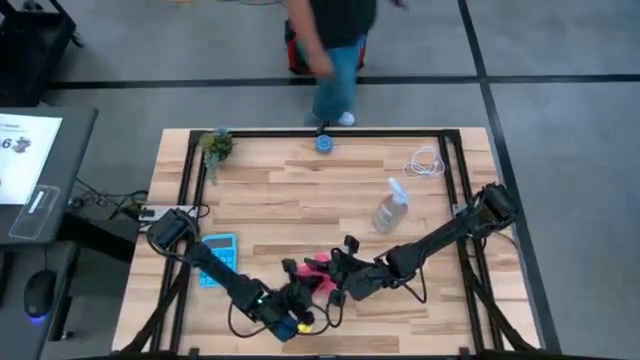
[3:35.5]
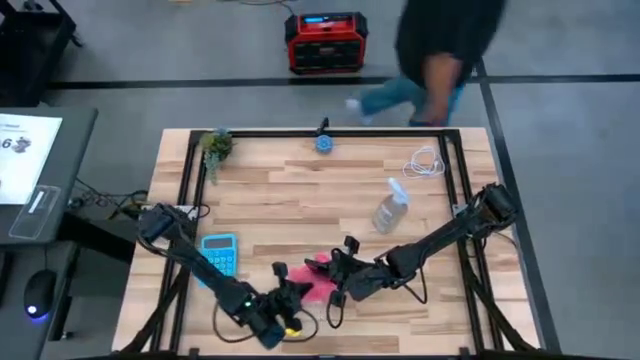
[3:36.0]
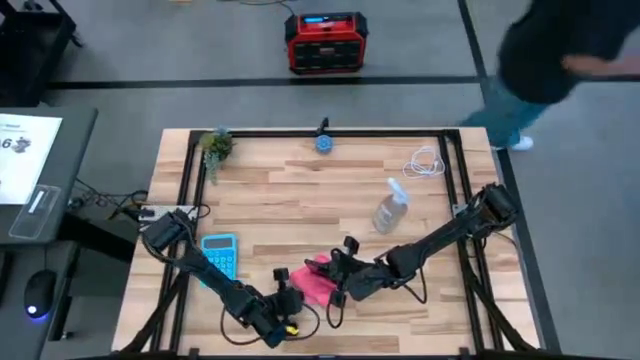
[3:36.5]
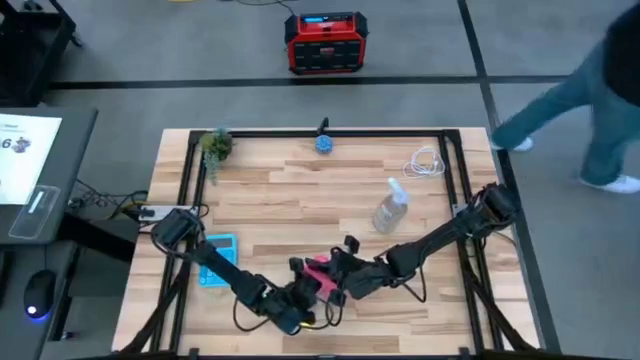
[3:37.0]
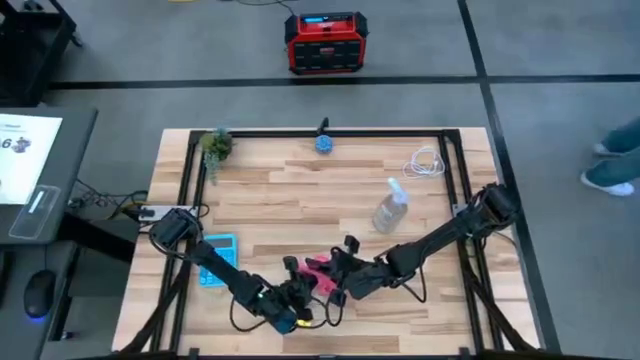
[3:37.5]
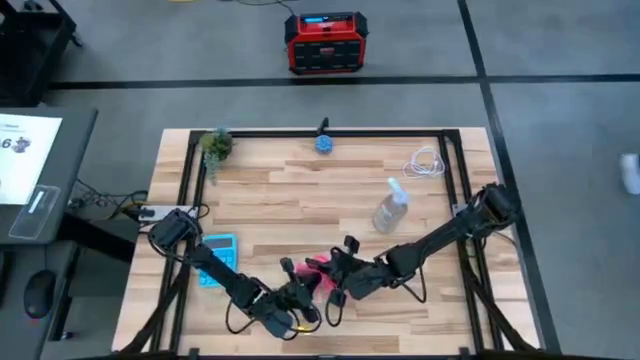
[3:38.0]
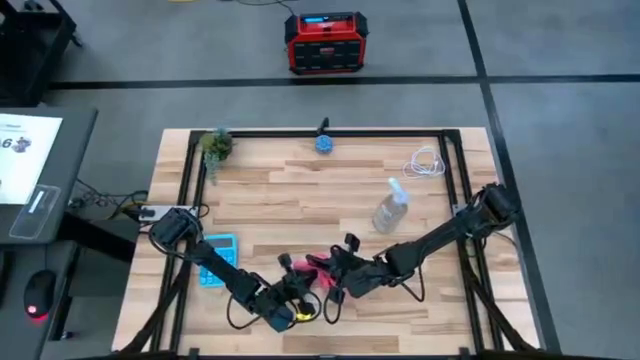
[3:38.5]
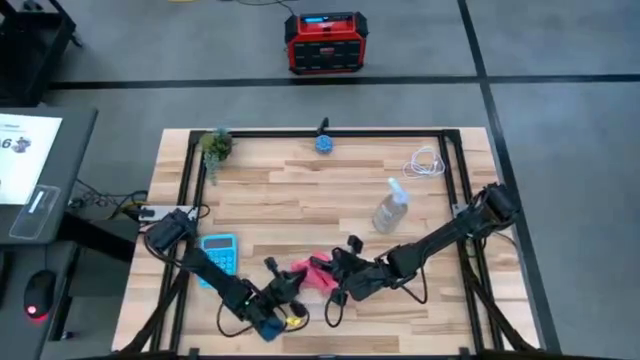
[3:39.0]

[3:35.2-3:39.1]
Task: Apply microfiber cloth
Wipe the front of the black cellphone using pink microfiber cloth

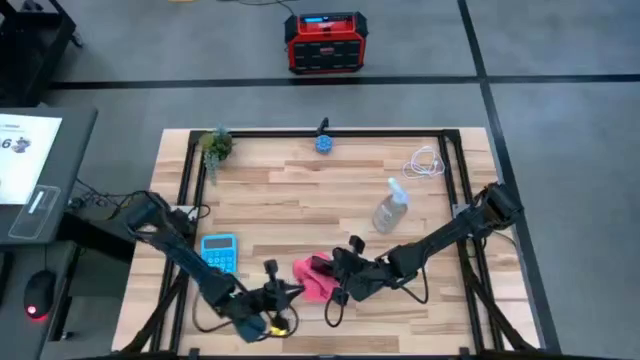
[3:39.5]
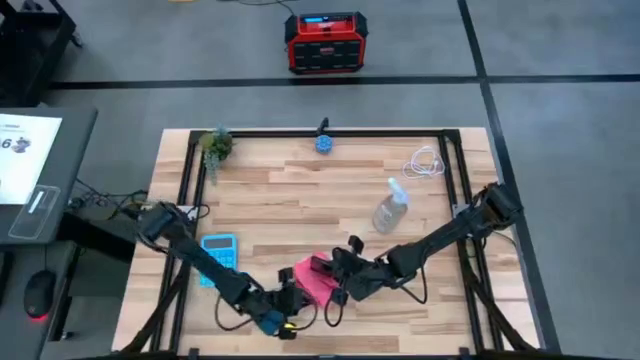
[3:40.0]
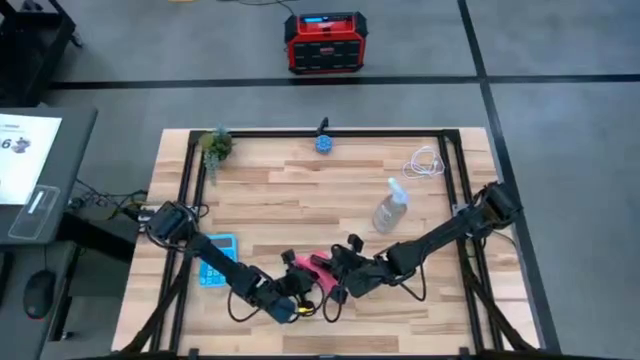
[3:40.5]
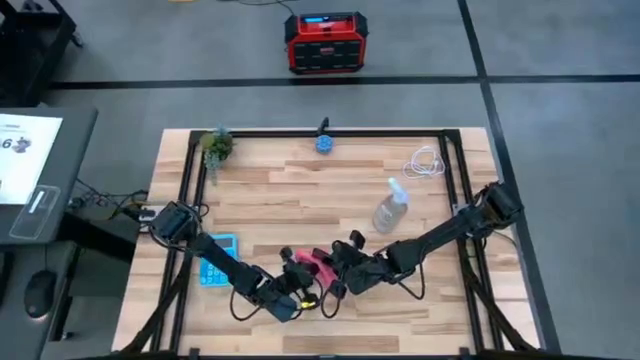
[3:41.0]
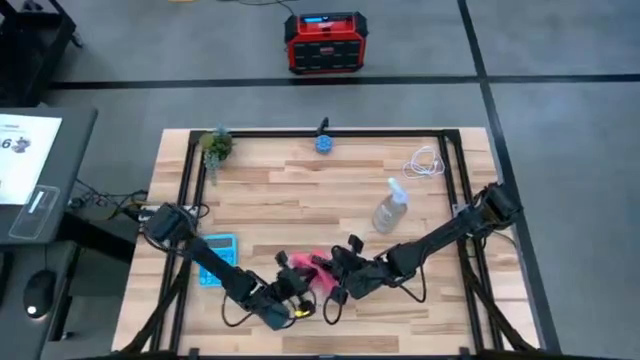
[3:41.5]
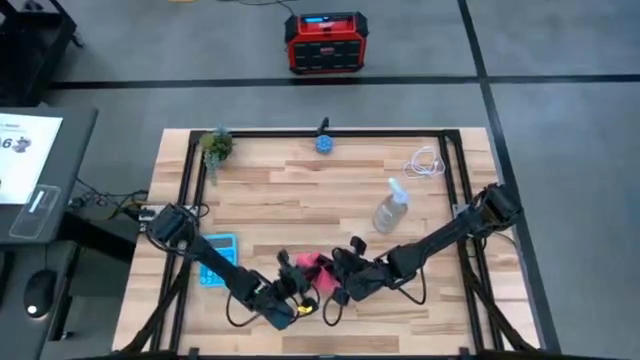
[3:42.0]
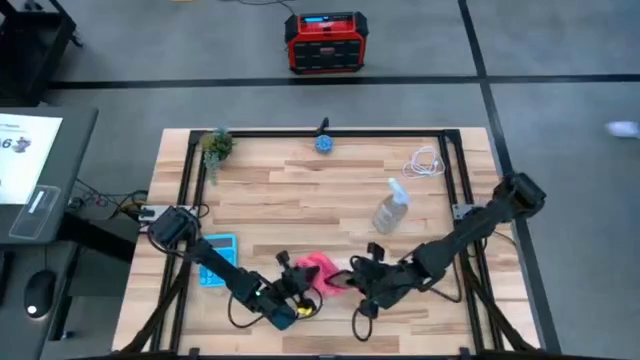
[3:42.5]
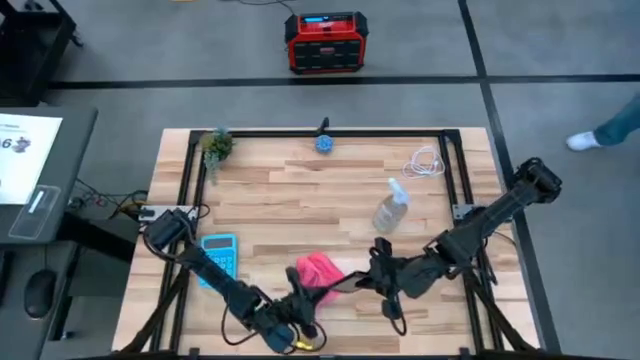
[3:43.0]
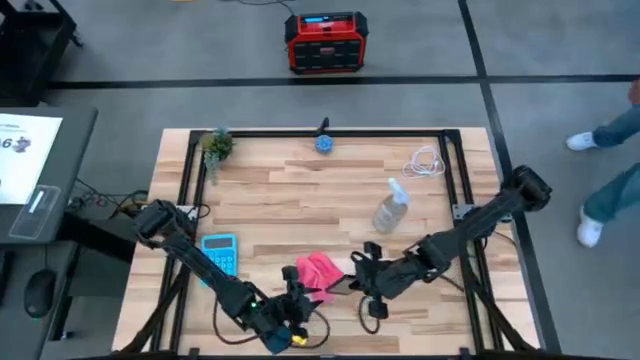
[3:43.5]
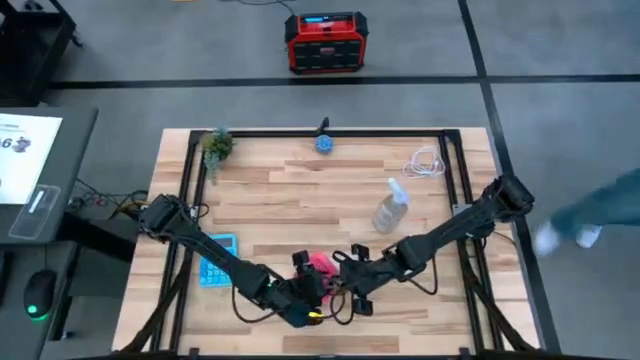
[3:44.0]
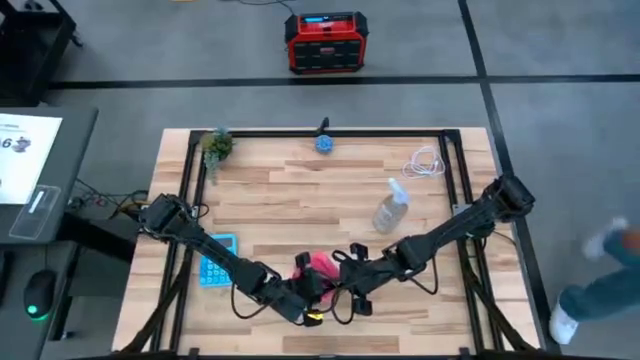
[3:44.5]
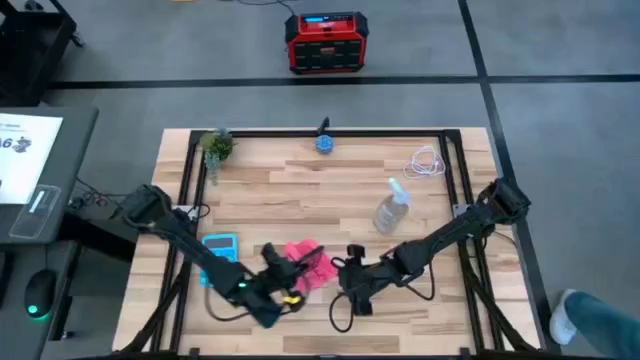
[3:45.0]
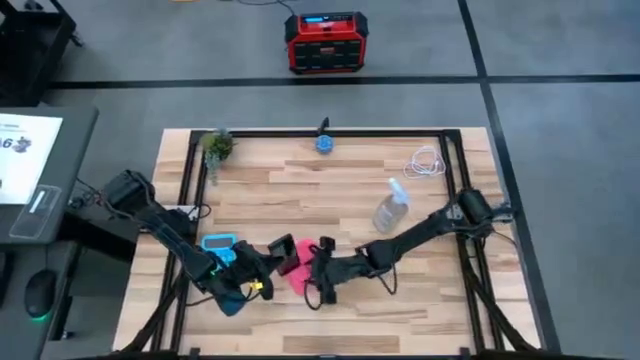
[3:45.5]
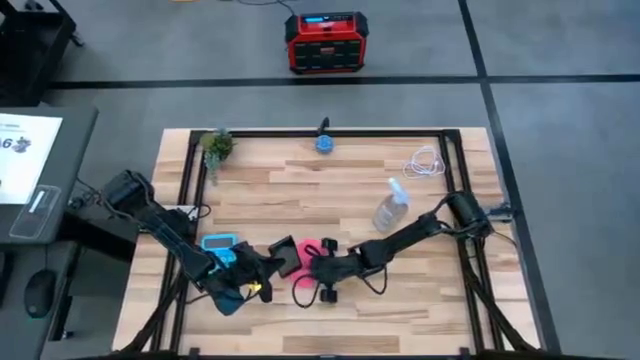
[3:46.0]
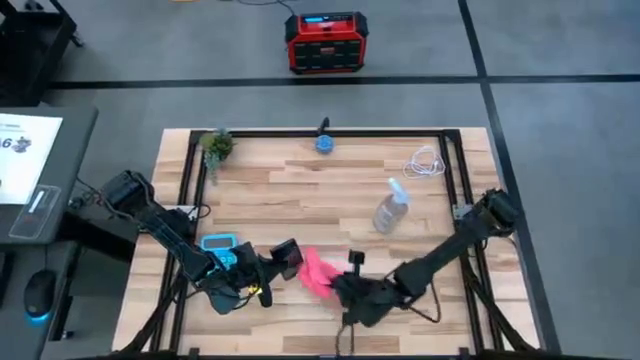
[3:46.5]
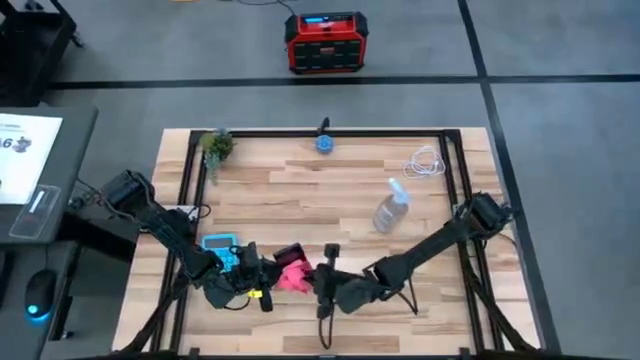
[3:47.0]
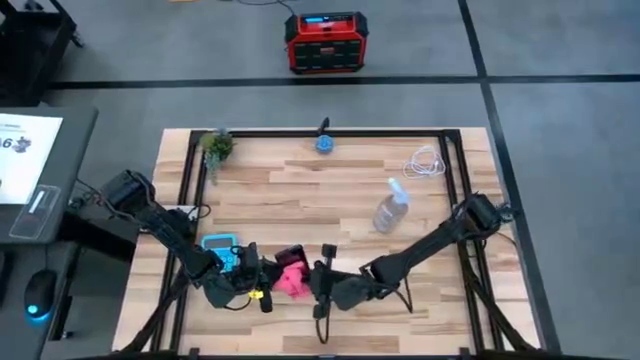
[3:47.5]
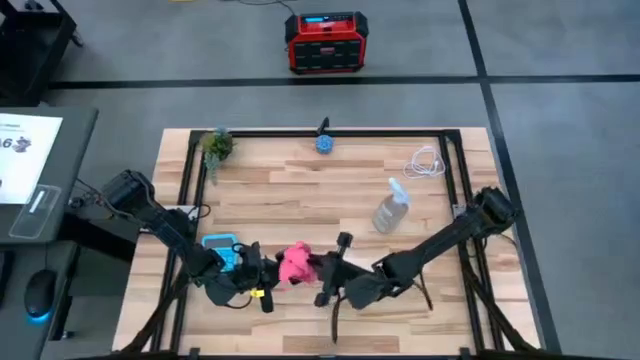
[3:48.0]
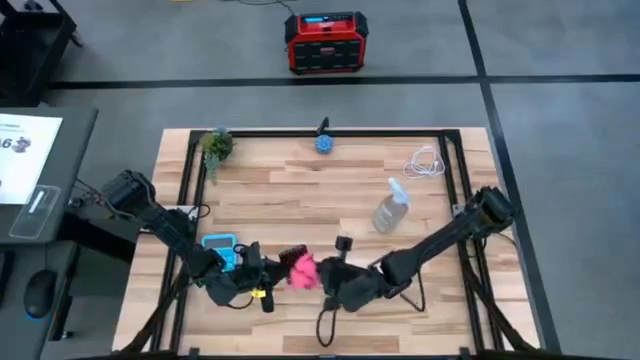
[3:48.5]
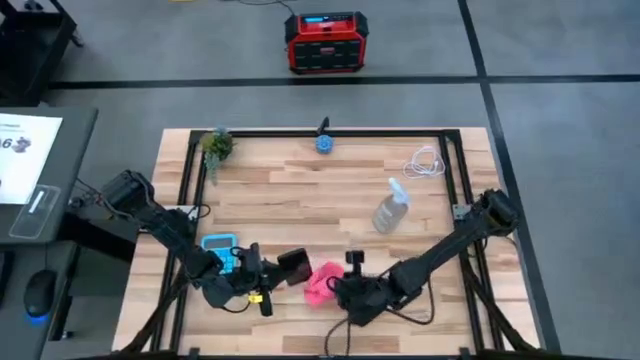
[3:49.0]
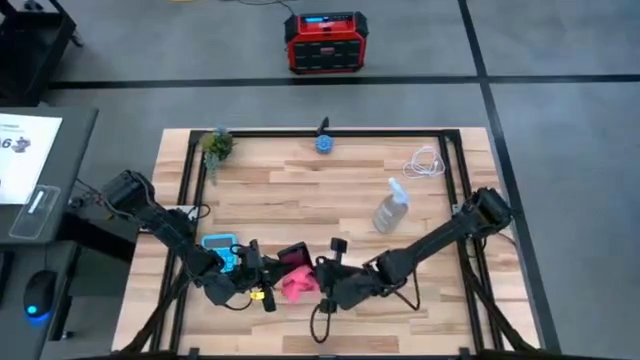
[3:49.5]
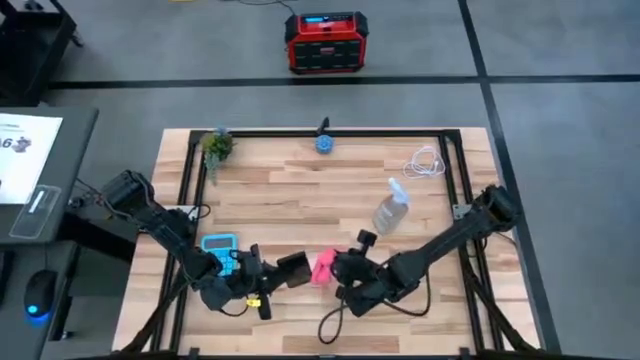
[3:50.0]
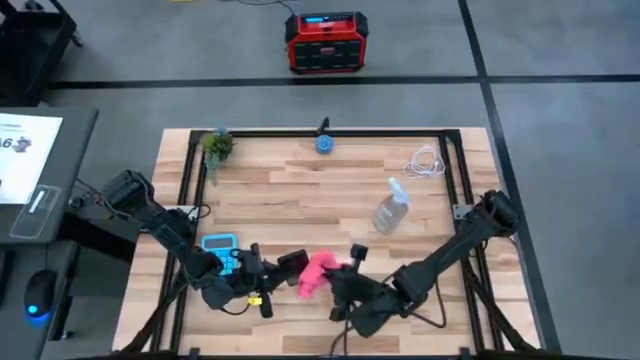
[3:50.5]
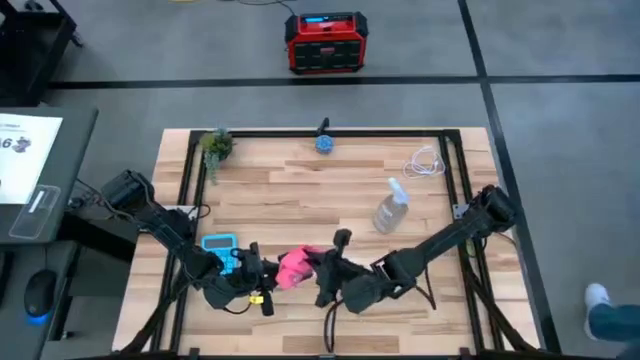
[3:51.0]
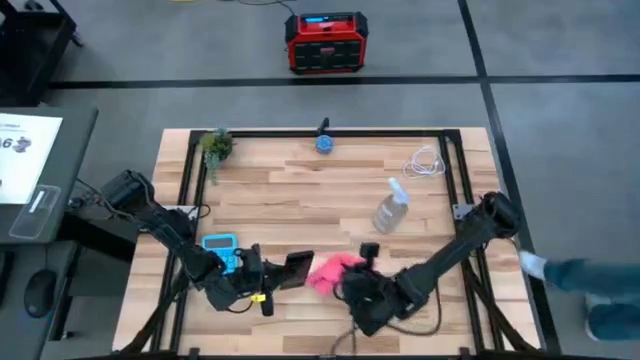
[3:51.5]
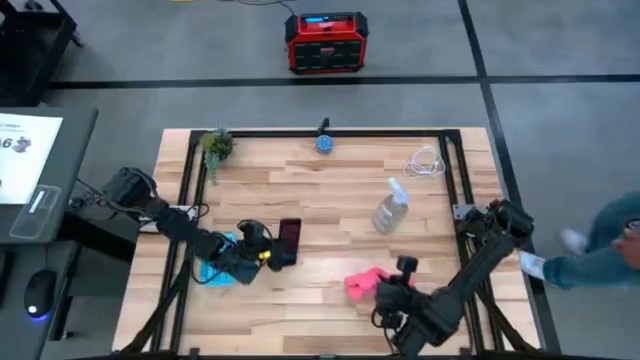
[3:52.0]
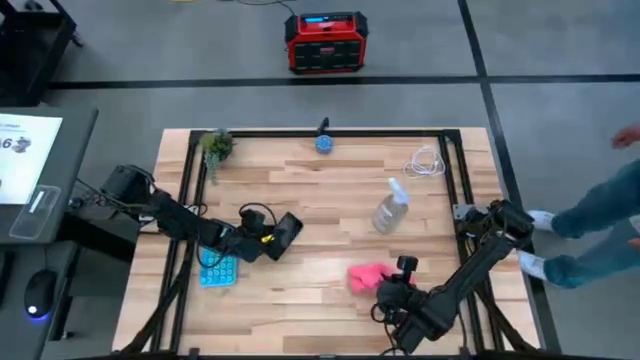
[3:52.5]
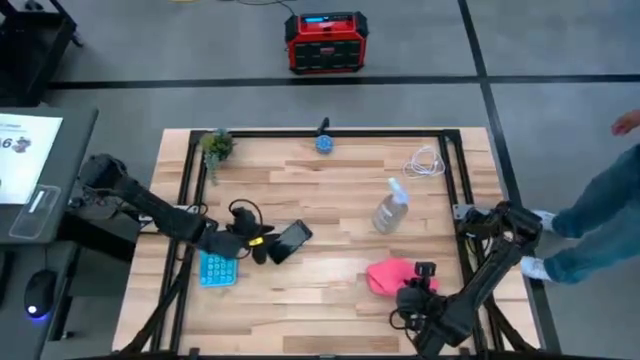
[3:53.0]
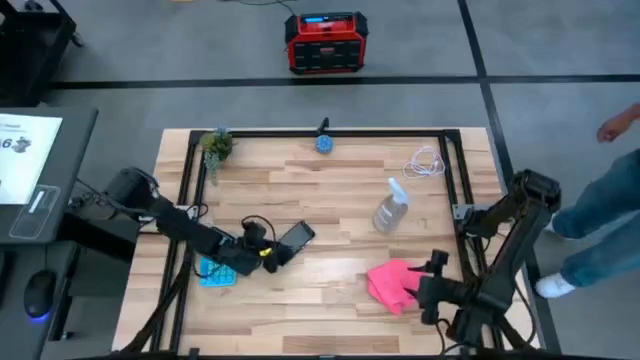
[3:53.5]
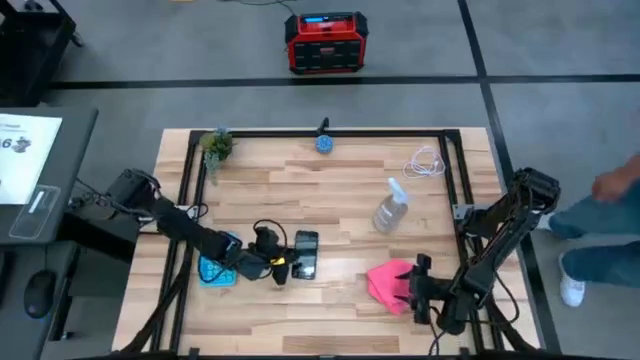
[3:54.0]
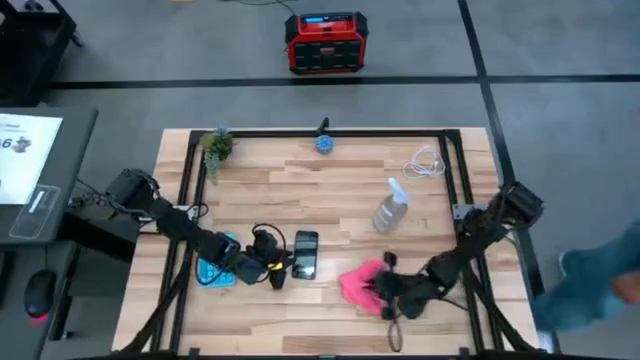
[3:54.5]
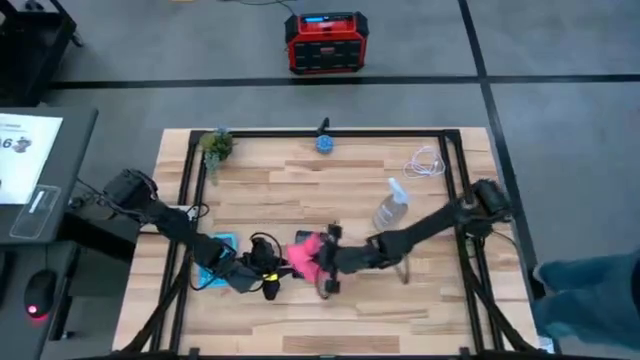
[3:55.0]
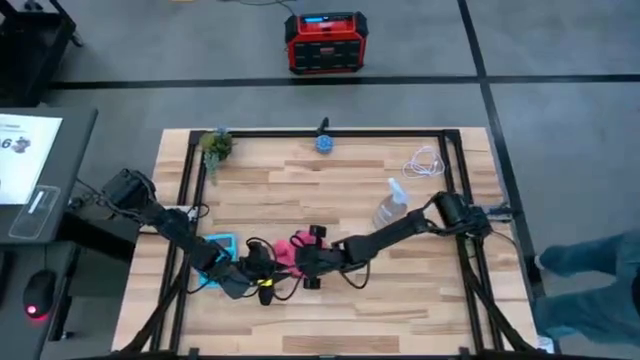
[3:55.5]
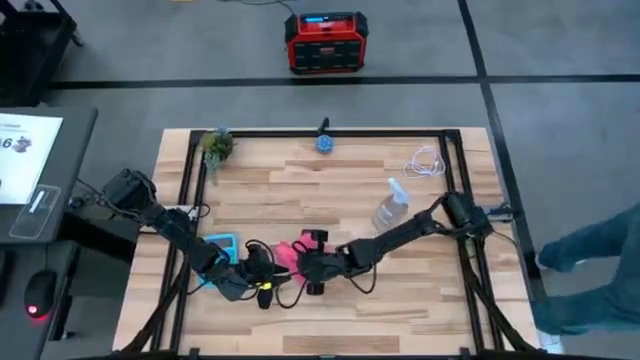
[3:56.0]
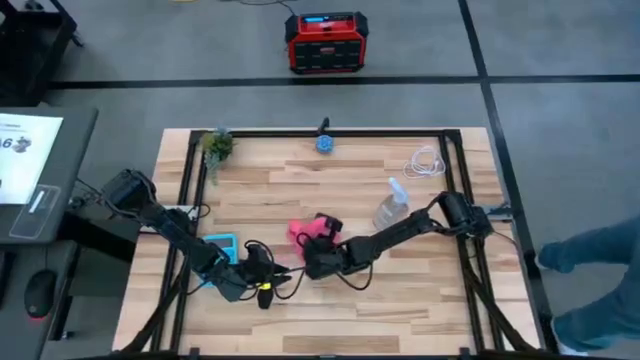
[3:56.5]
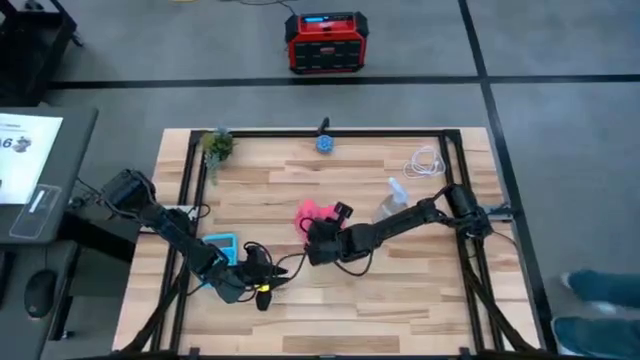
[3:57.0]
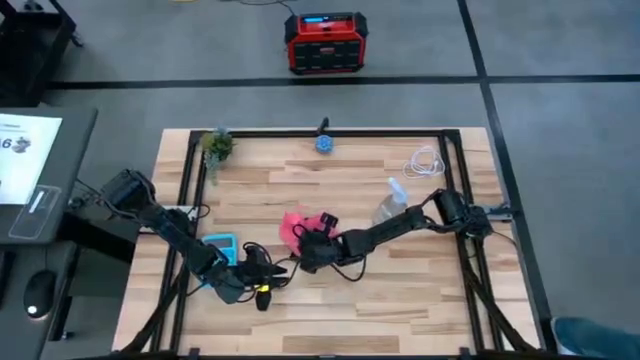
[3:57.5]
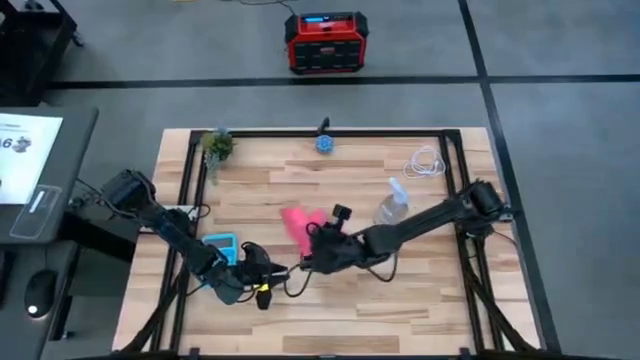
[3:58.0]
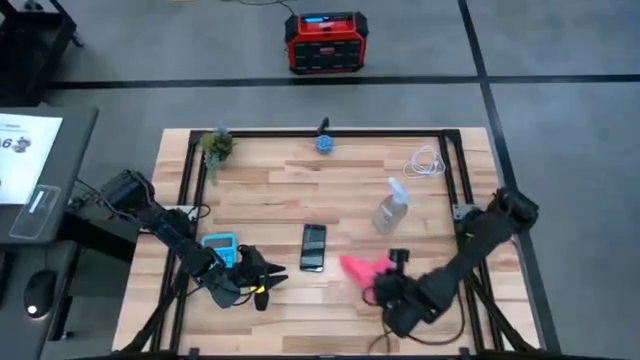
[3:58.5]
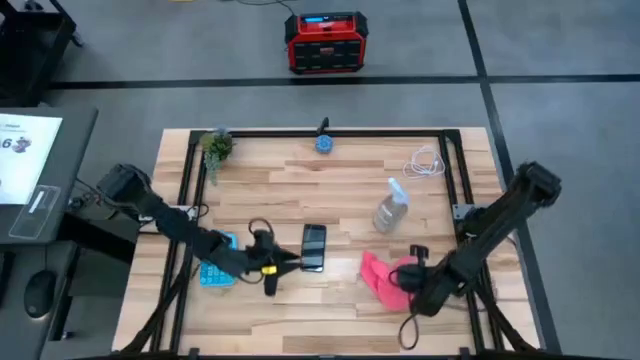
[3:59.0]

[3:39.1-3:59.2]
Wipe the front of the black cellphone using pink microfiber cloth
